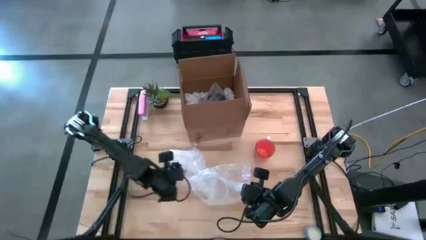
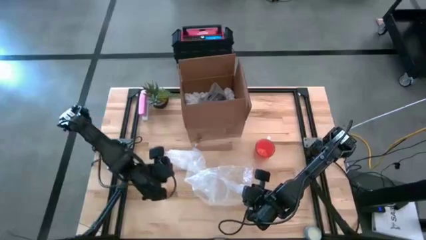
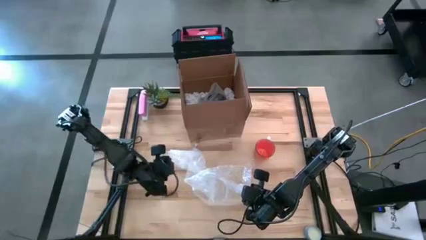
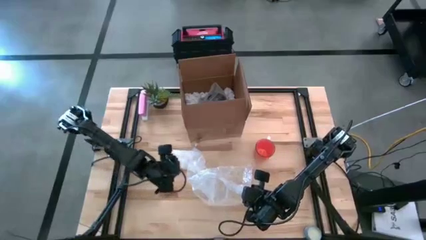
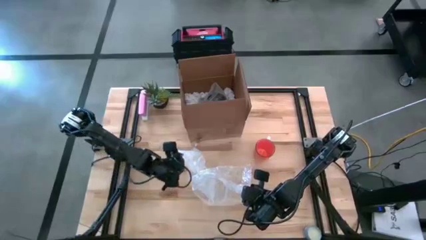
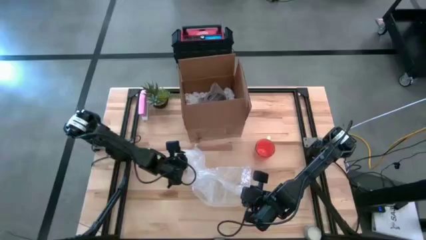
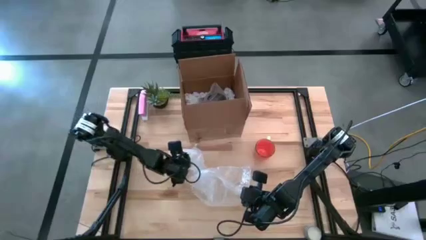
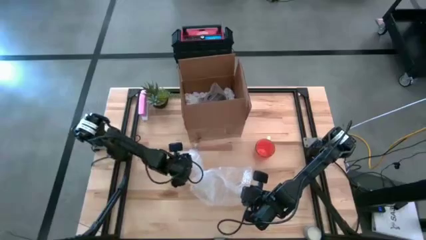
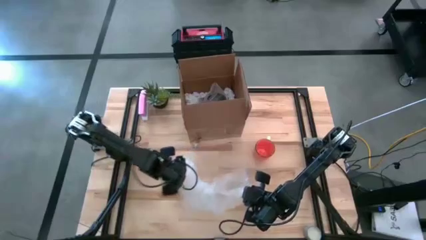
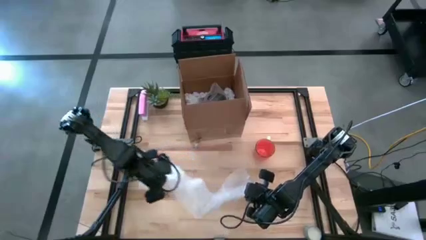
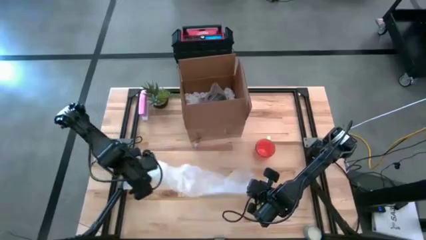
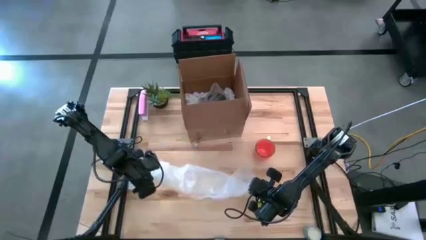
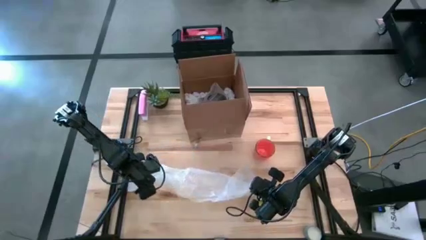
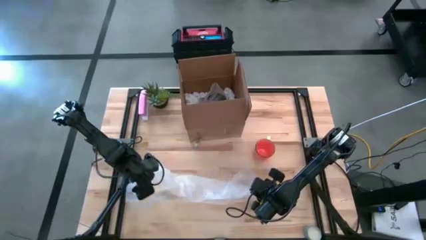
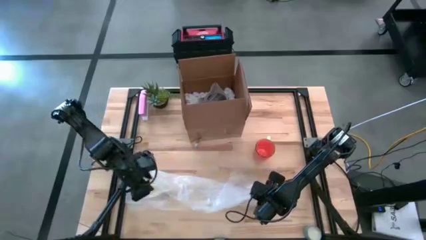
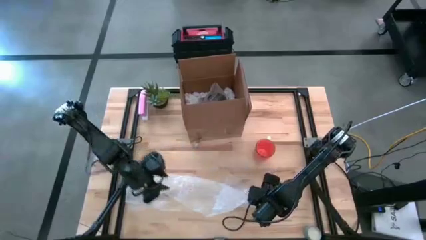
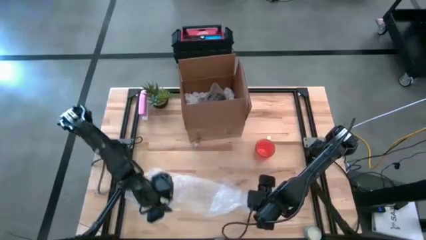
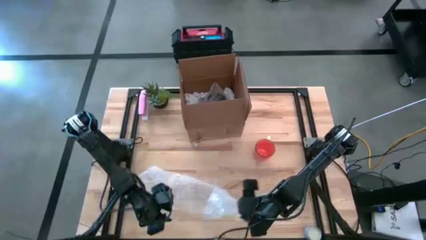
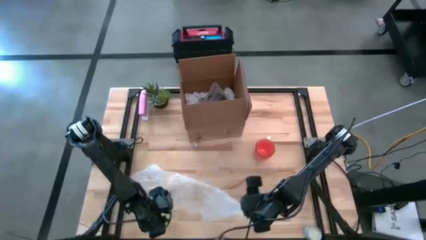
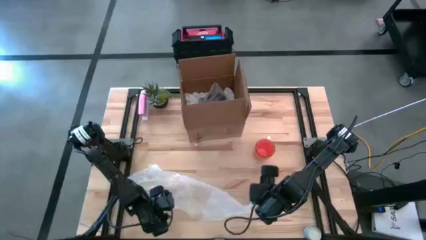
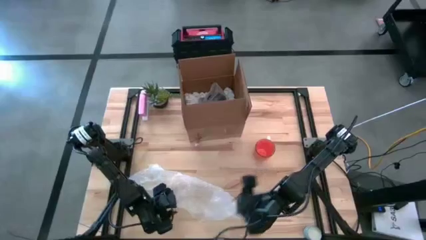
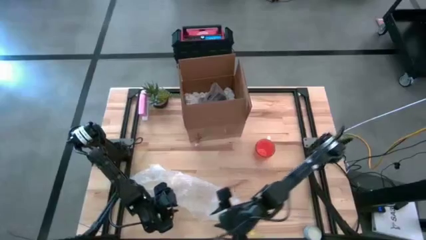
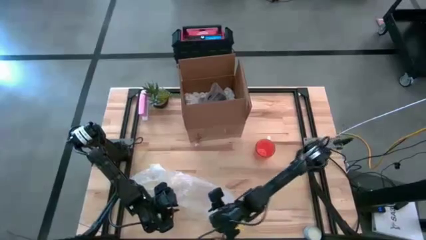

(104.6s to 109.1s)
Task: wrap mug
Prepare the transparent bubble wrap

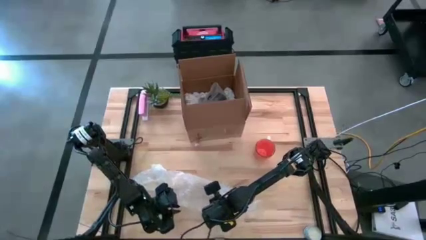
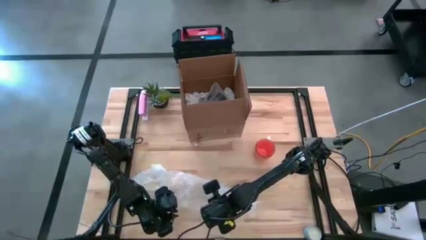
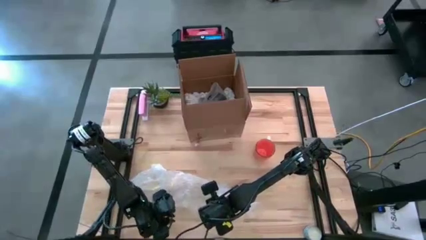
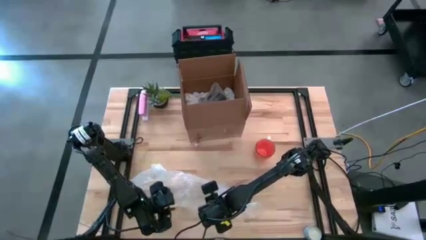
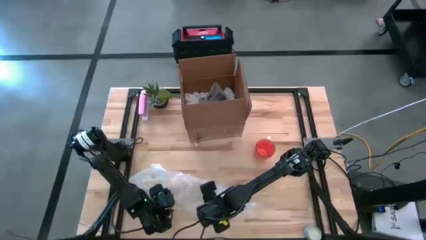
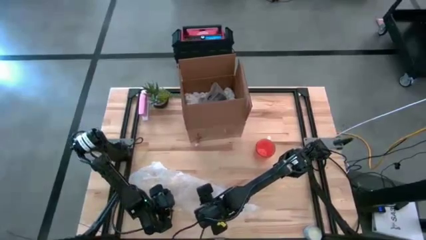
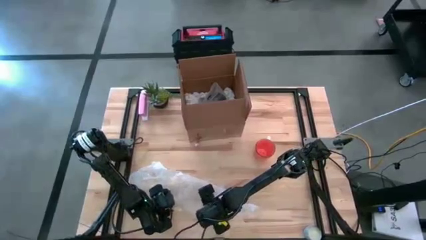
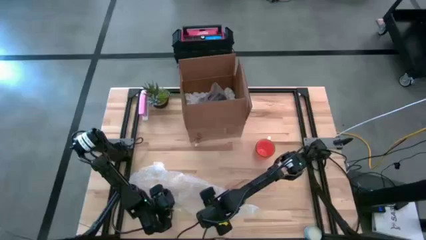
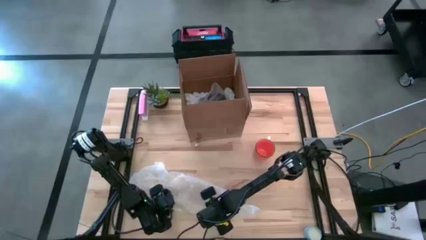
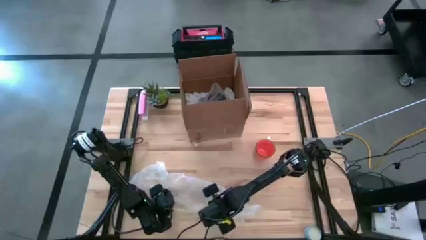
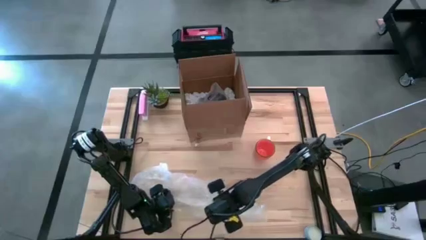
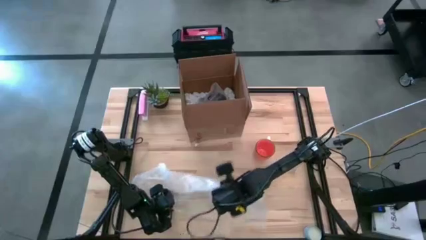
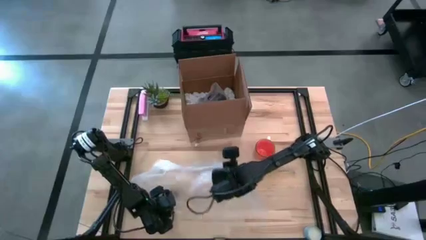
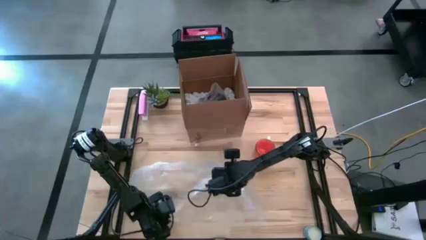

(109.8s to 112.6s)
Prepare the transparent bubble wrap

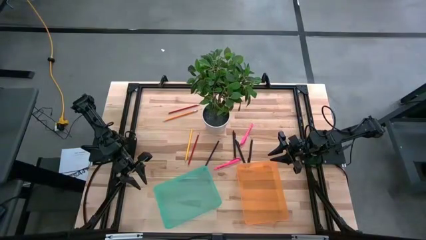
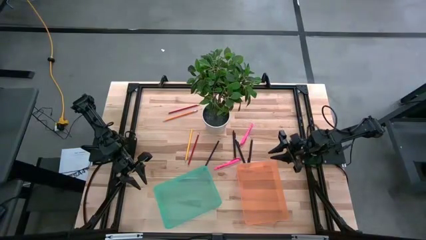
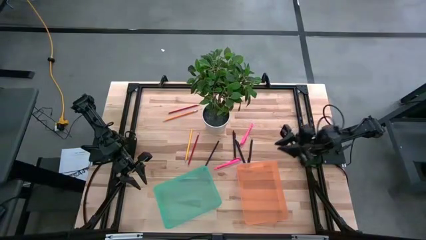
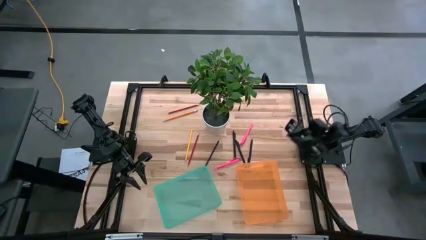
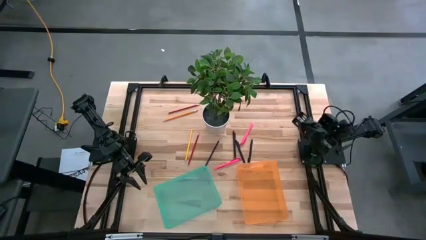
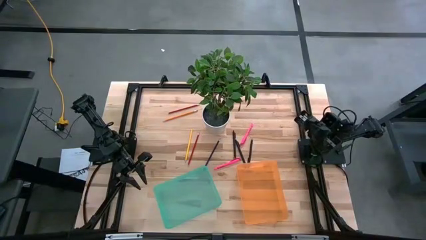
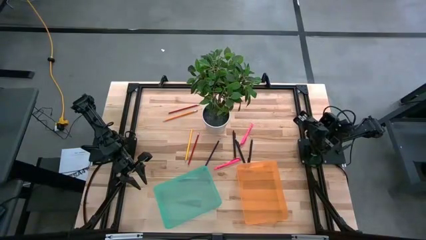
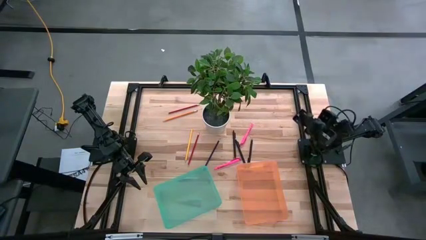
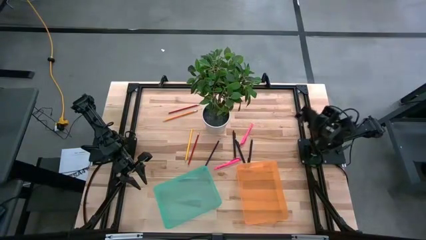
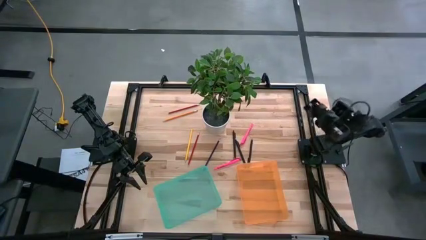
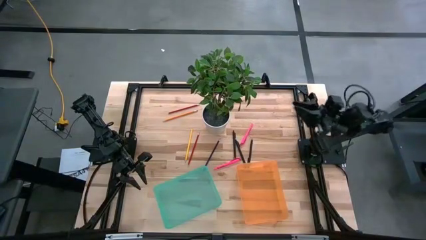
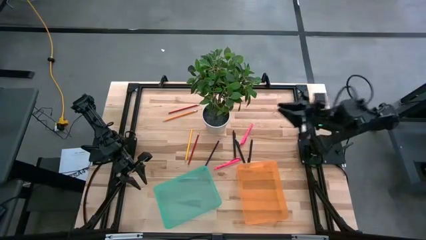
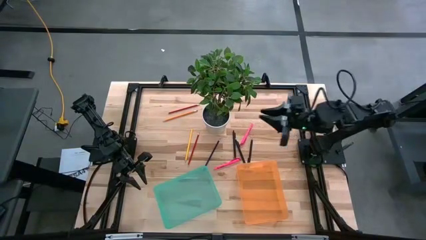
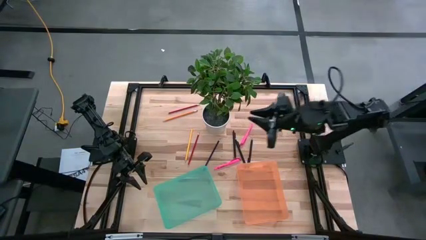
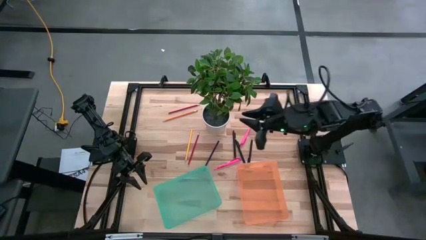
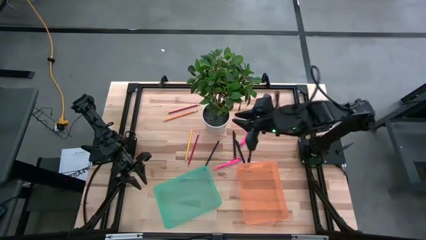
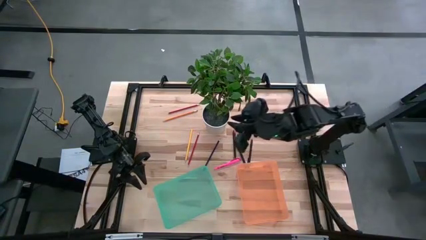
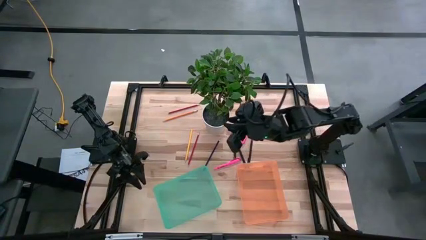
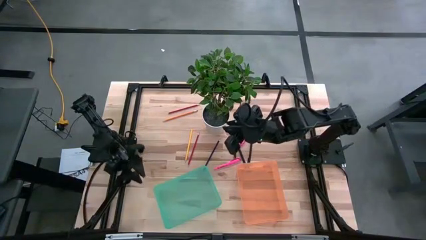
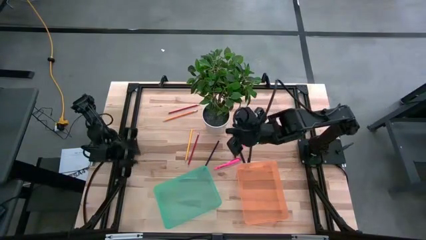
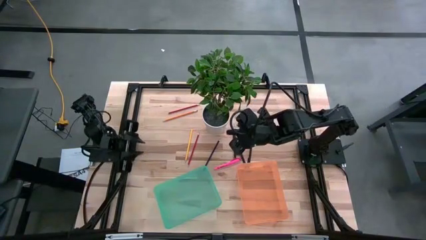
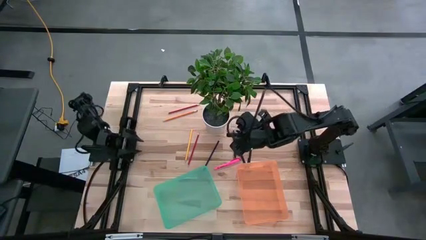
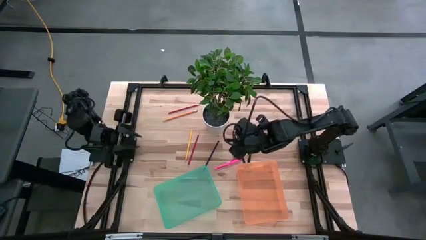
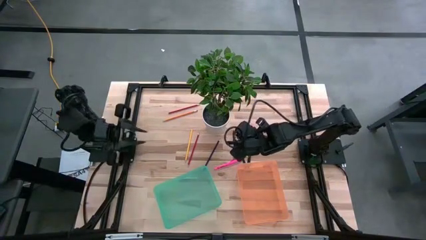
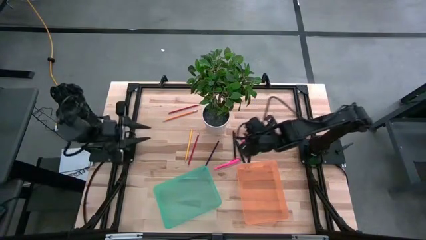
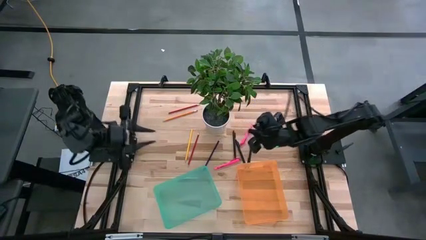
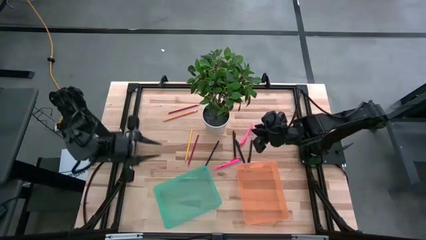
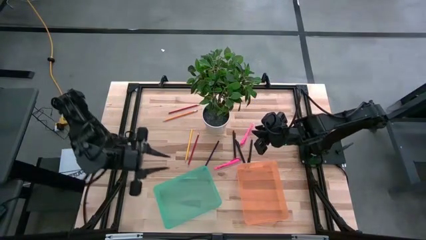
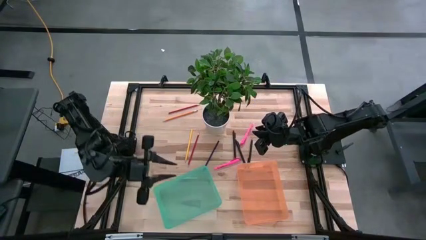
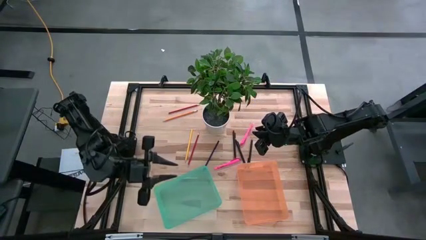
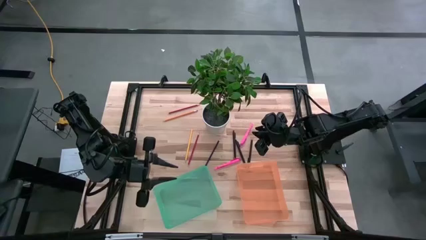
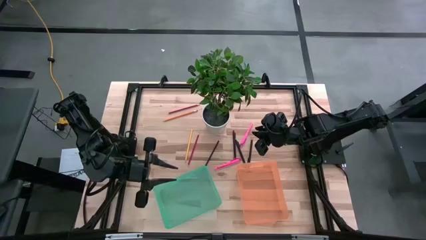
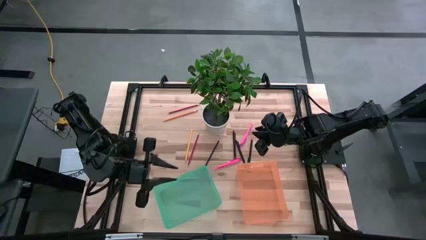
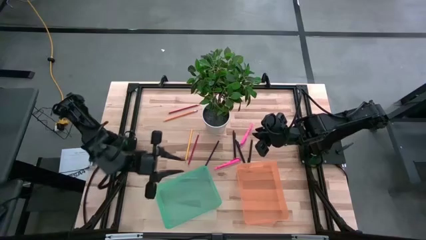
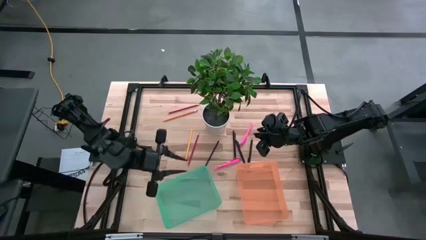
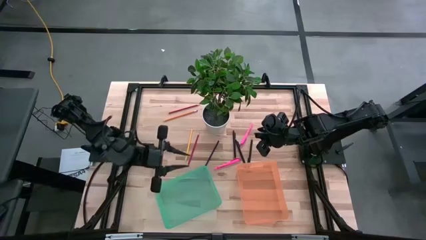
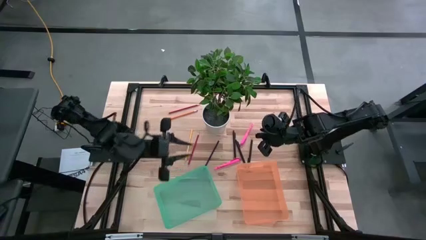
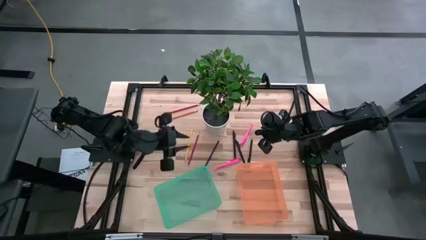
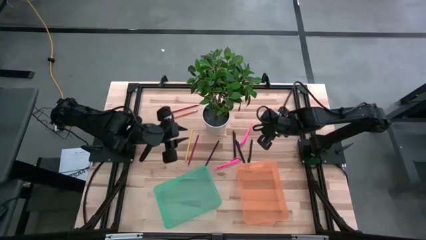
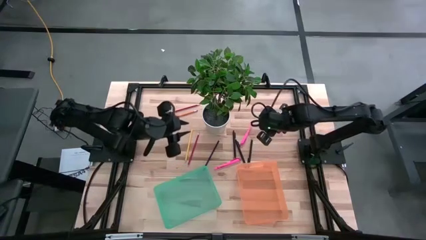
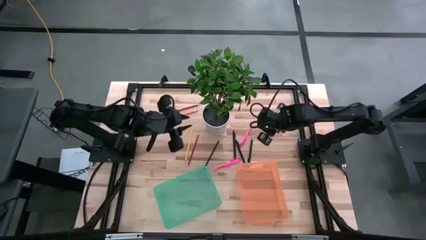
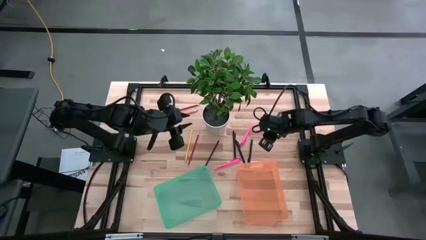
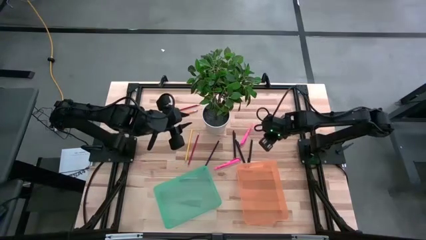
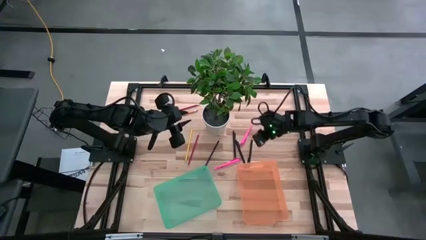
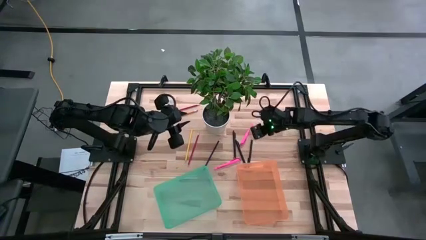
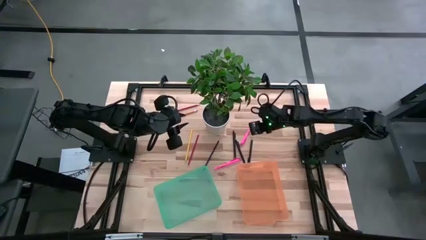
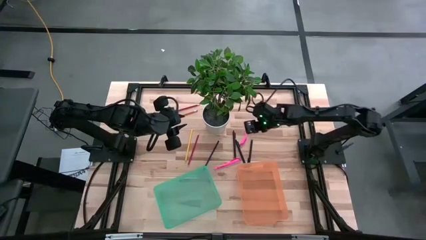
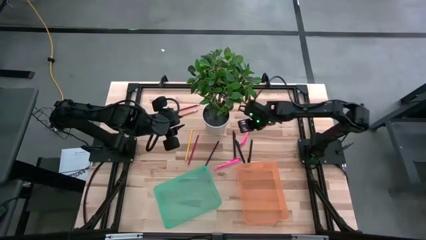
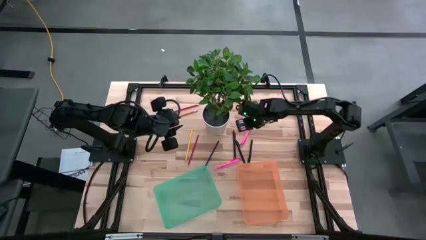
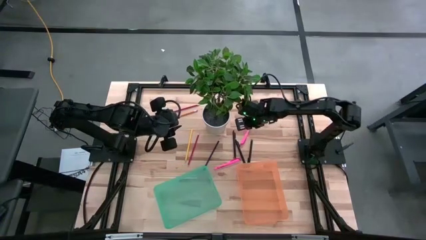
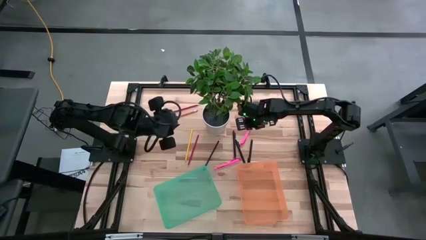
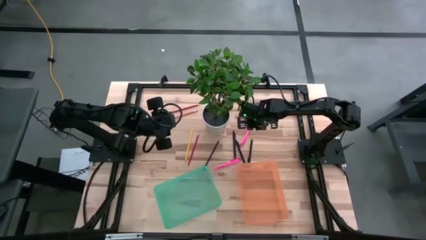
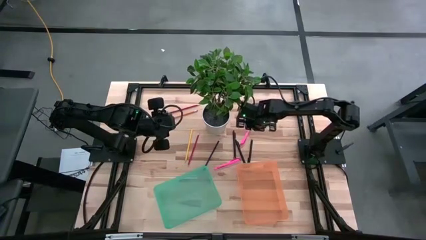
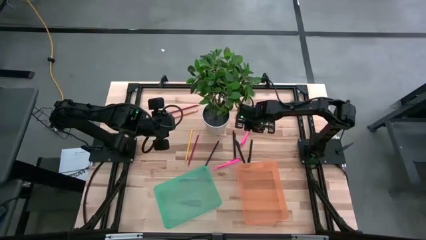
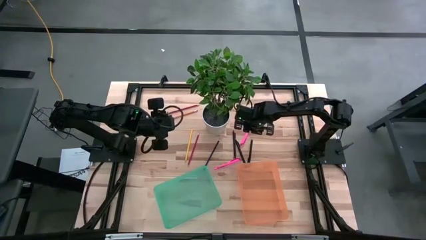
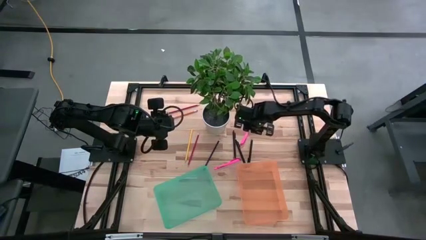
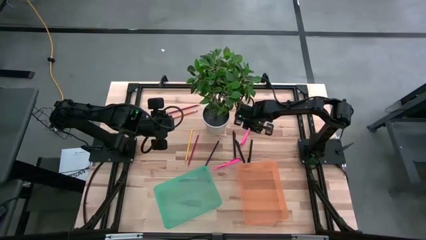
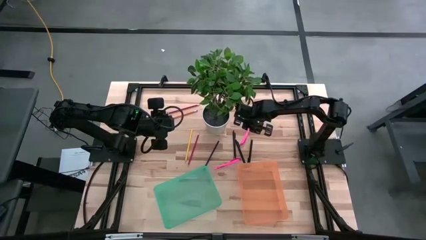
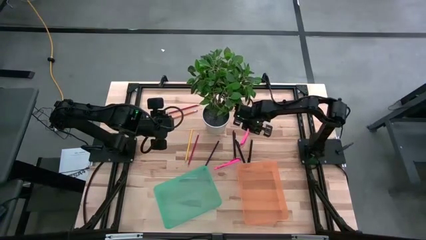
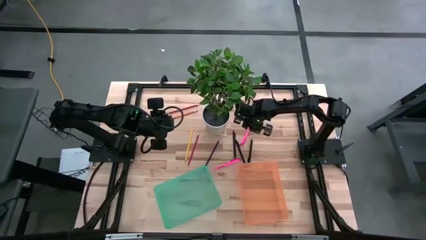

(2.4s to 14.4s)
Task: Sort pens & pencils
Put the top right pink pen into the green bin
